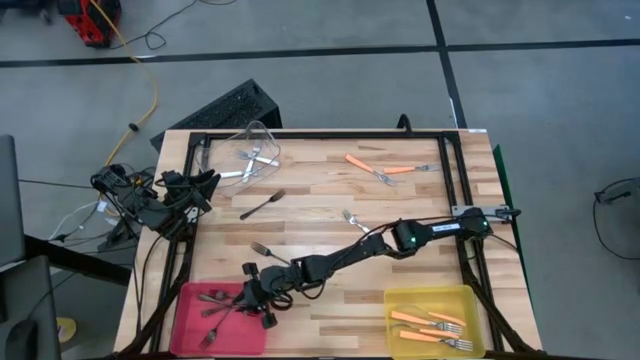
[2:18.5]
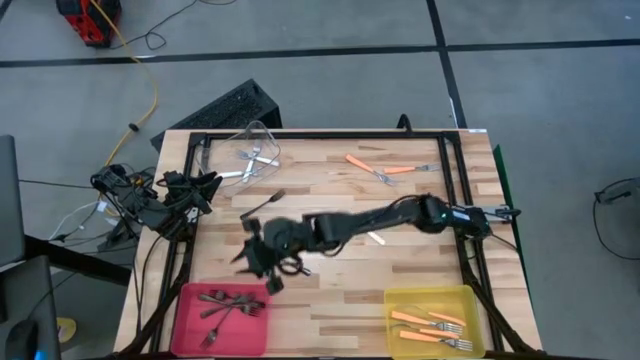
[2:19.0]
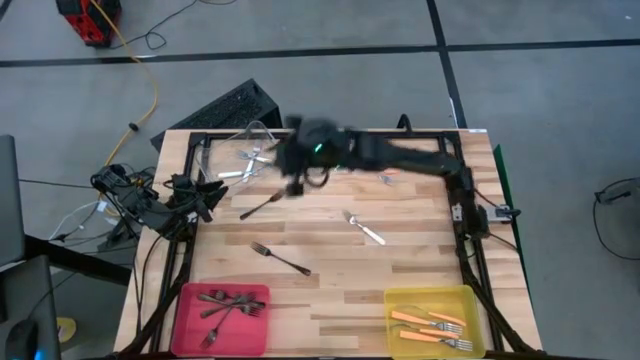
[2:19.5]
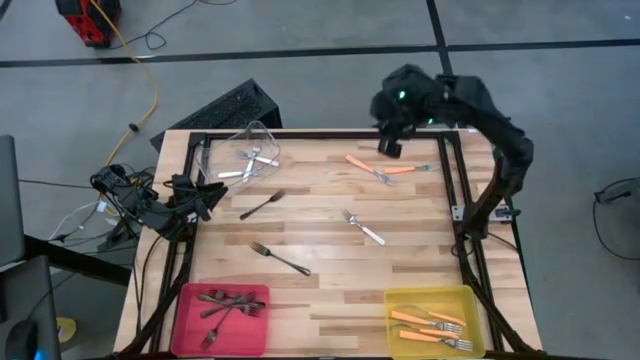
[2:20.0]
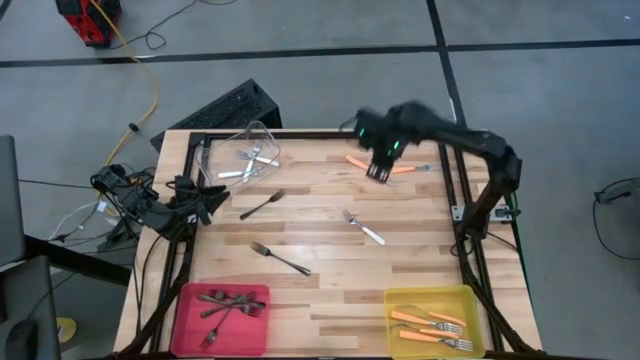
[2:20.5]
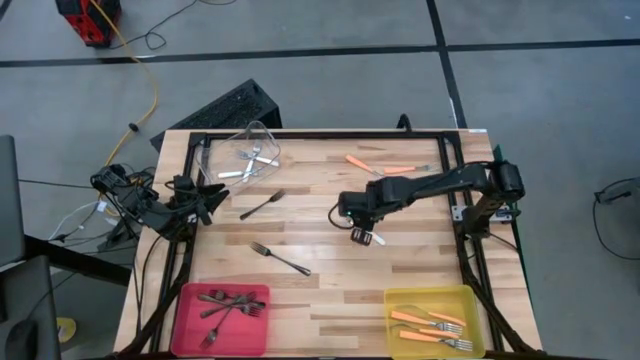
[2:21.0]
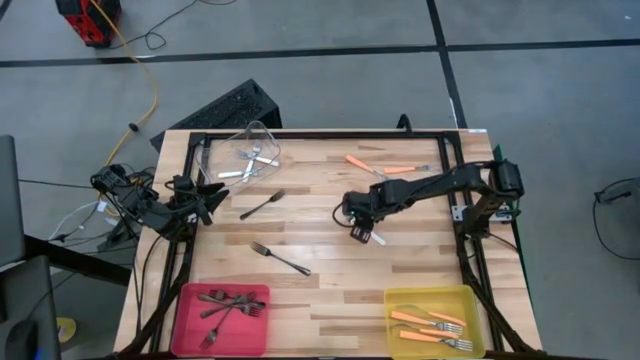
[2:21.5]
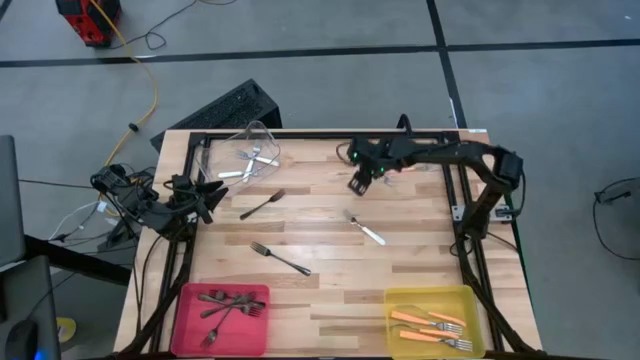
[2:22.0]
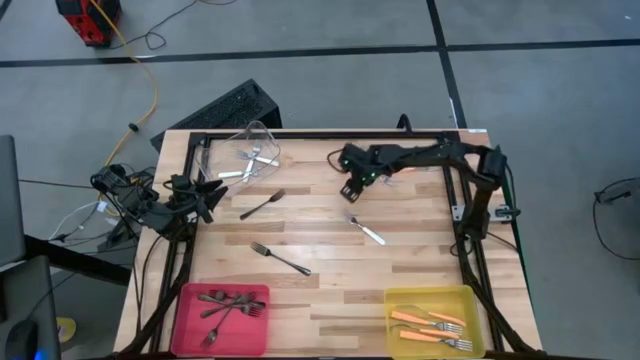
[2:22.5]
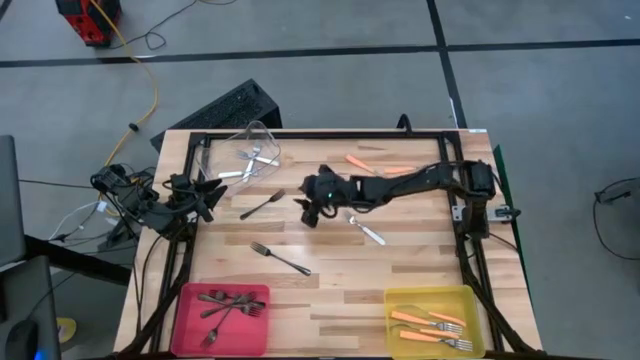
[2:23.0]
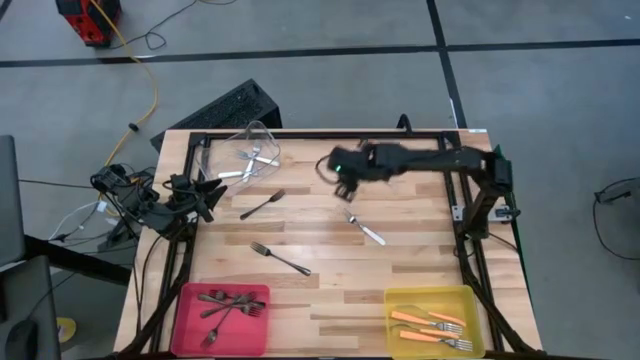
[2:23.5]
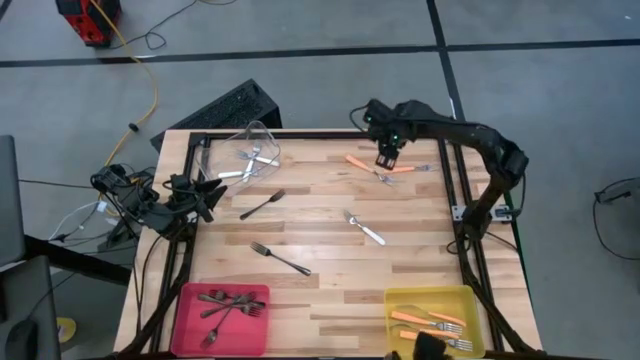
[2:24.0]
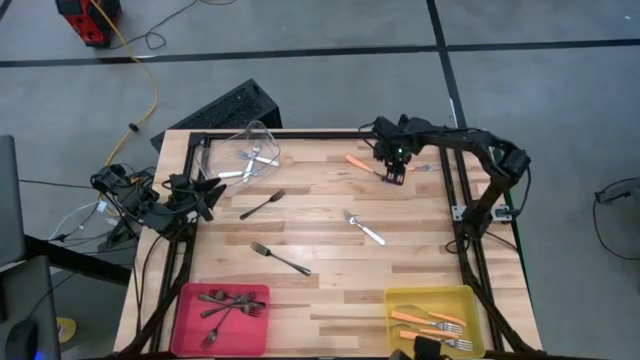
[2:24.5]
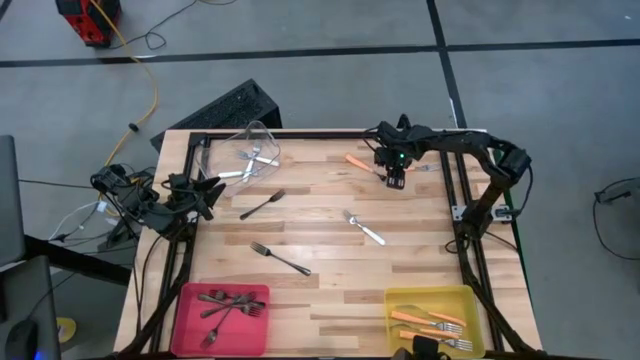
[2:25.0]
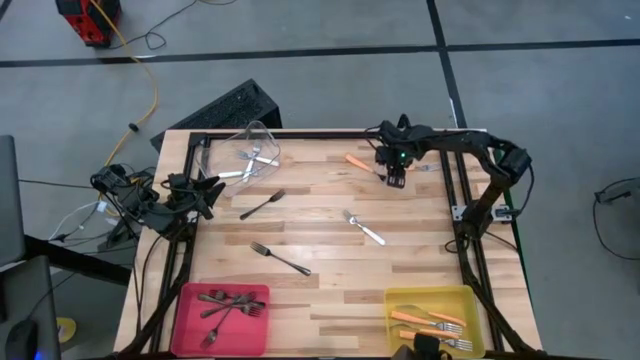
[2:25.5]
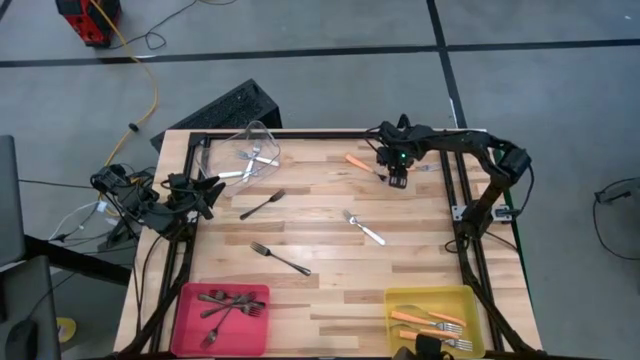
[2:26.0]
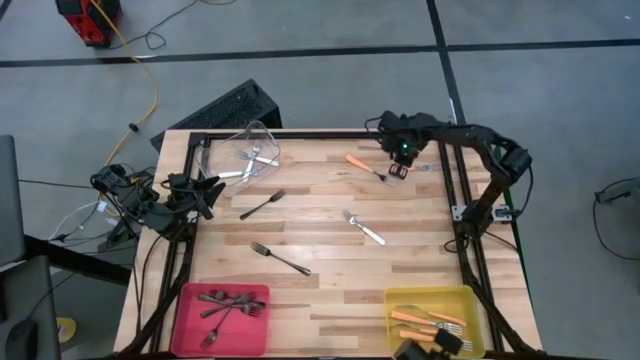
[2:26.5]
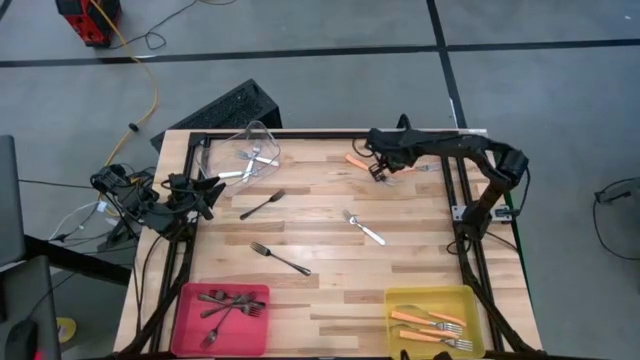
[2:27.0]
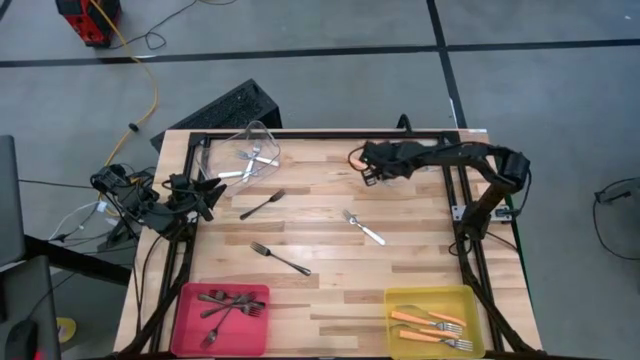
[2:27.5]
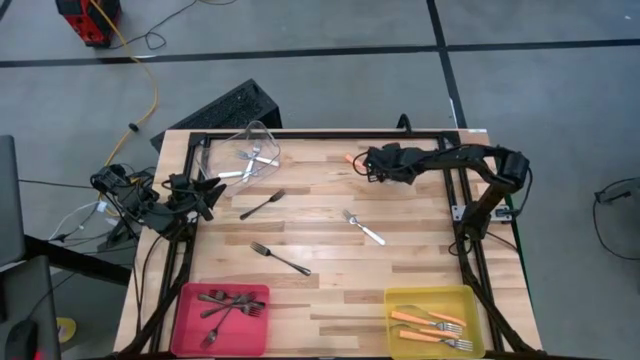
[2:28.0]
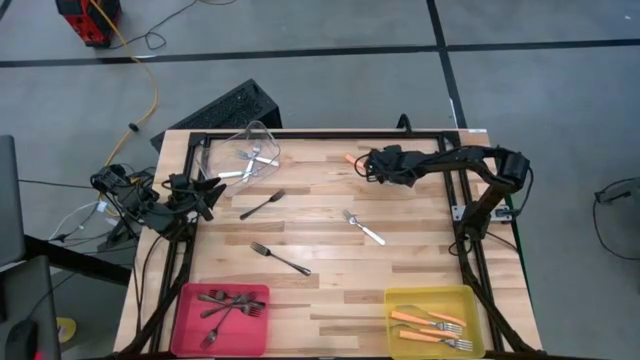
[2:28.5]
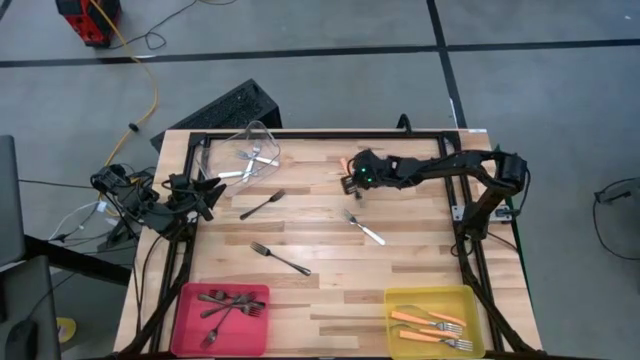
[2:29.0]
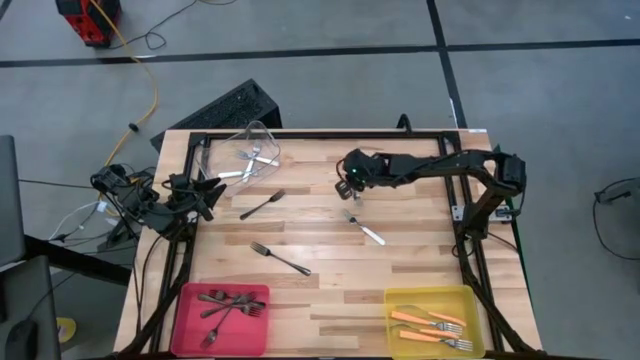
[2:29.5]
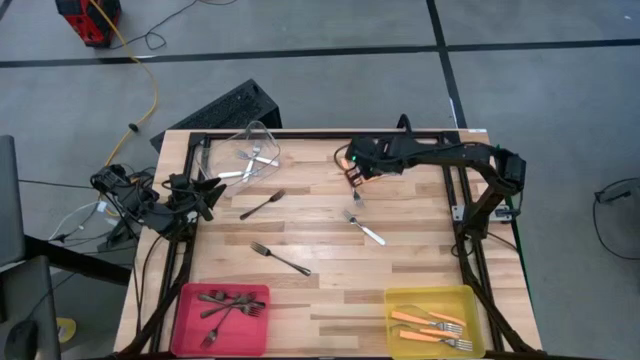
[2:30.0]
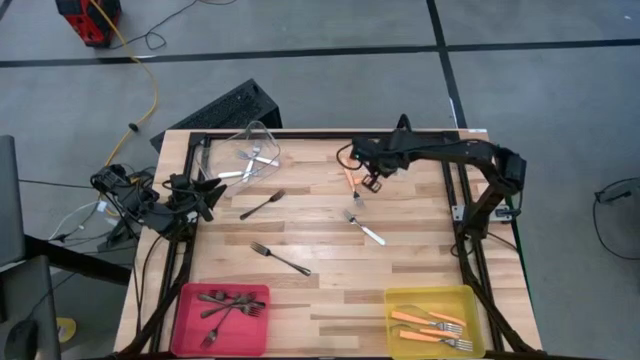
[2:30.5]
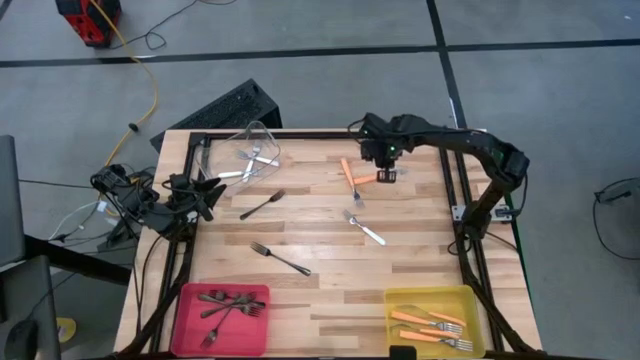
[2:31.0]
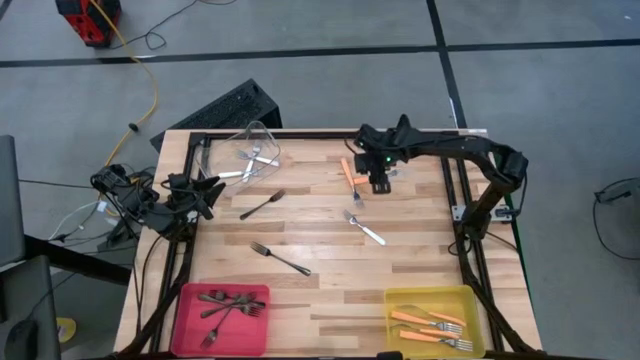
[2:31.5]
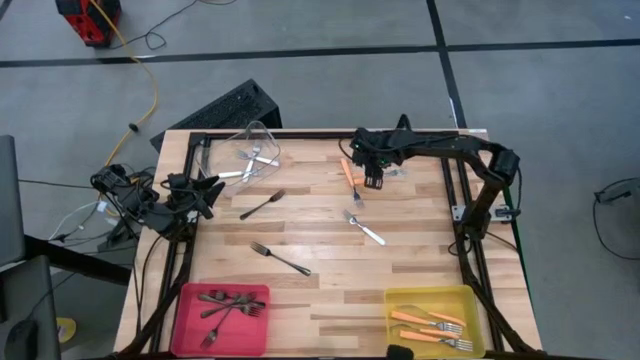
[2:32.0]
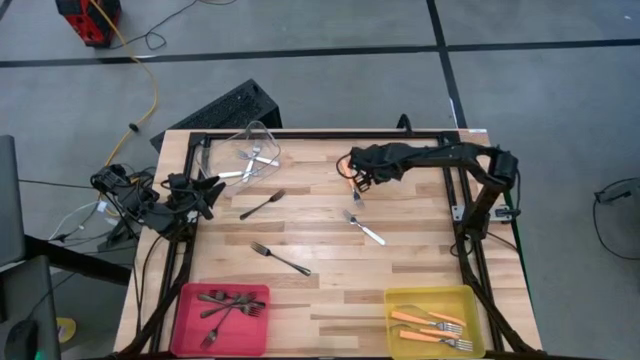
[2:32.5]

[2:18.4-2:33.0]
Task: Sort silverware by color (type)
Put the orange fork into the yellow bin

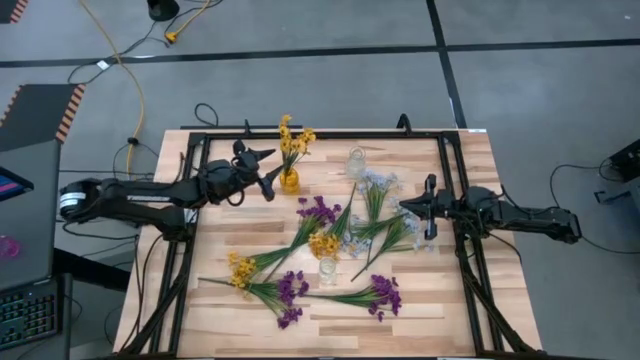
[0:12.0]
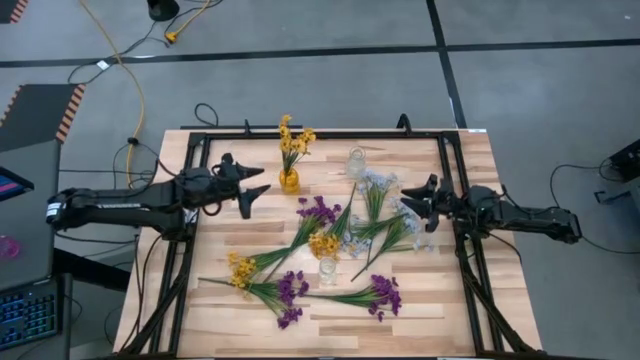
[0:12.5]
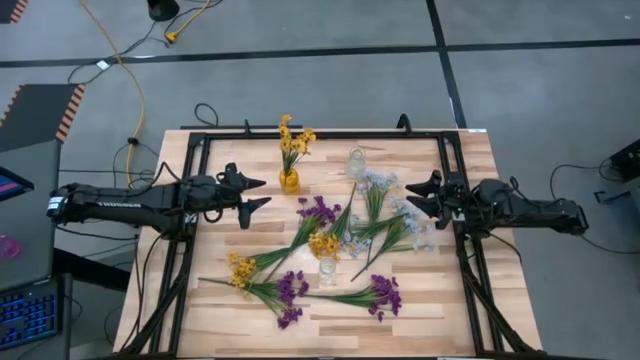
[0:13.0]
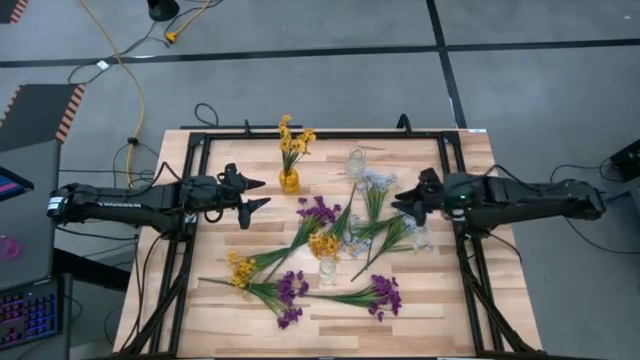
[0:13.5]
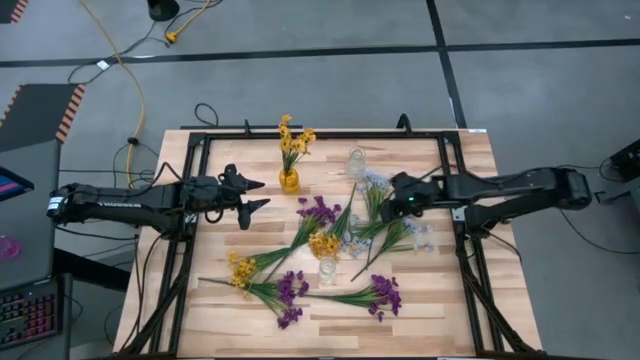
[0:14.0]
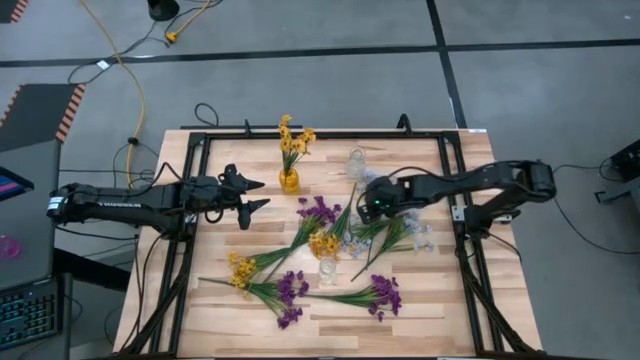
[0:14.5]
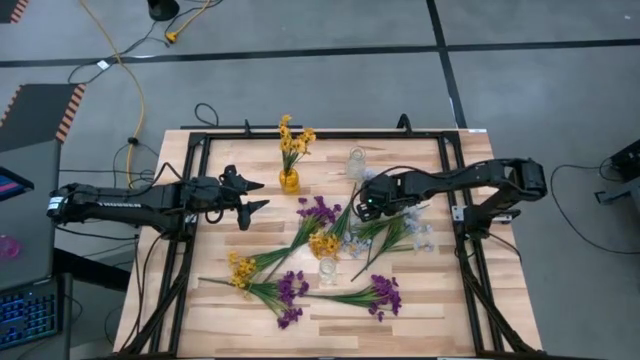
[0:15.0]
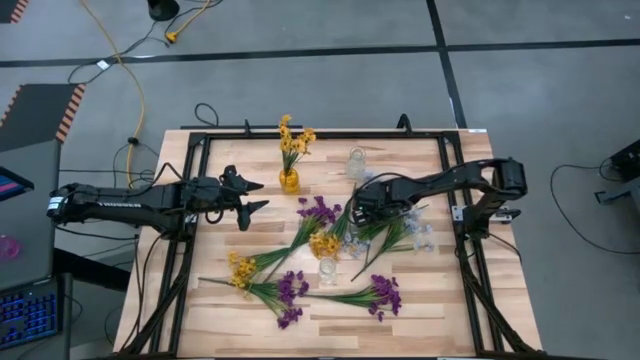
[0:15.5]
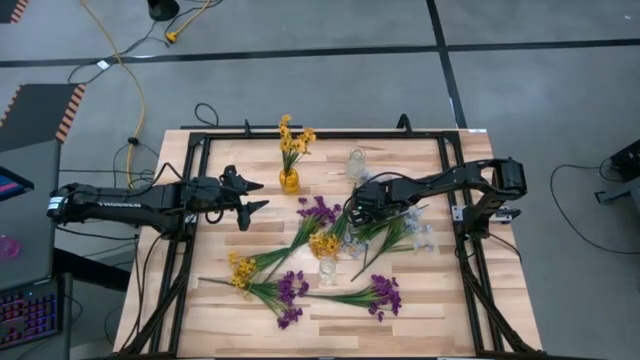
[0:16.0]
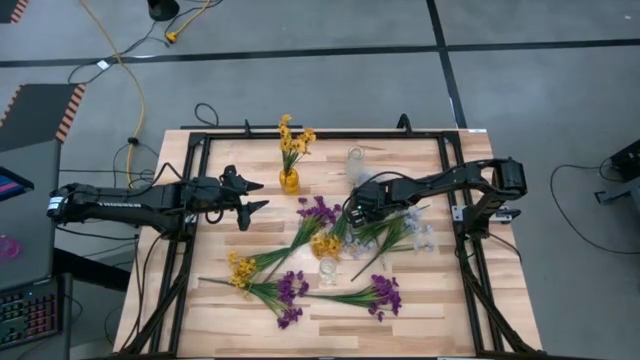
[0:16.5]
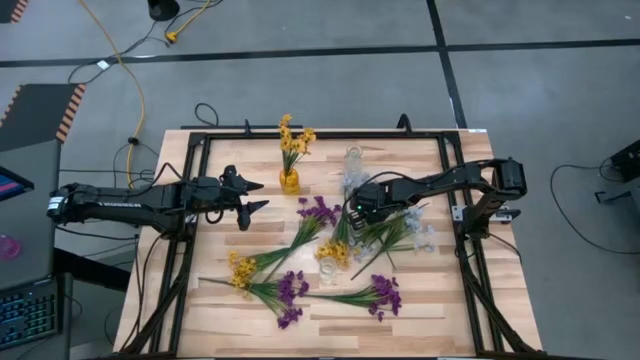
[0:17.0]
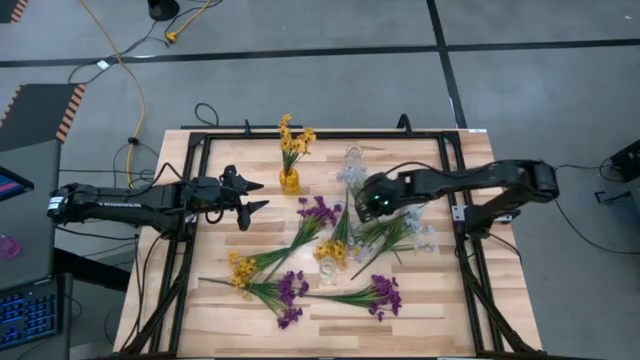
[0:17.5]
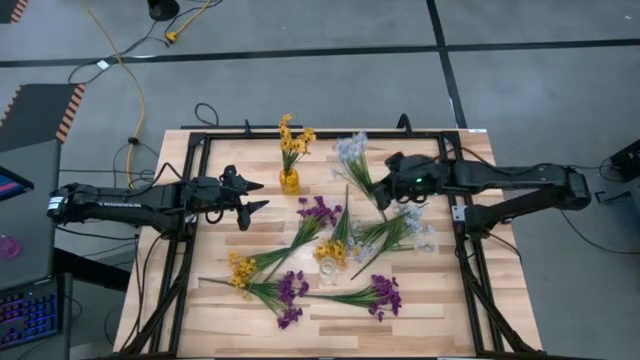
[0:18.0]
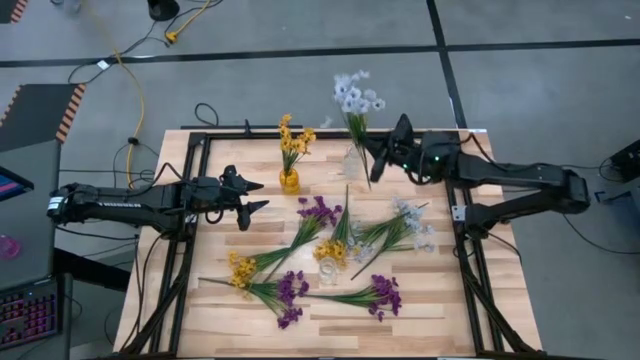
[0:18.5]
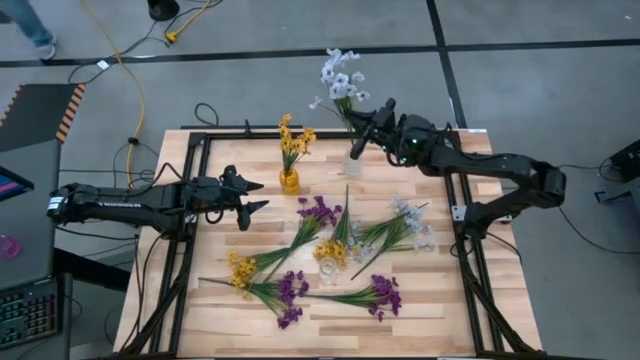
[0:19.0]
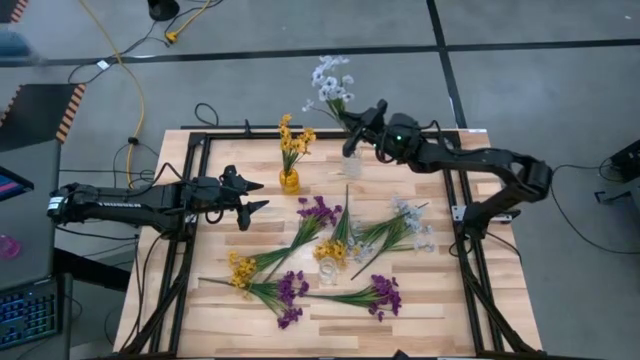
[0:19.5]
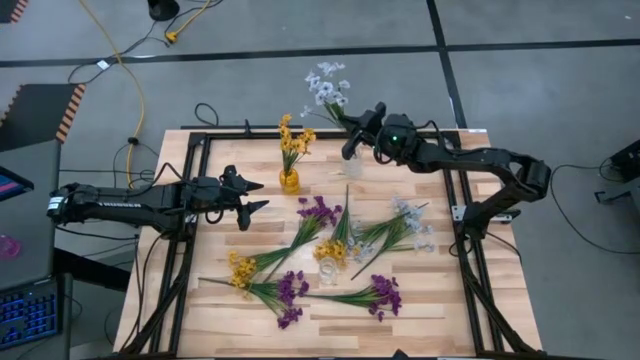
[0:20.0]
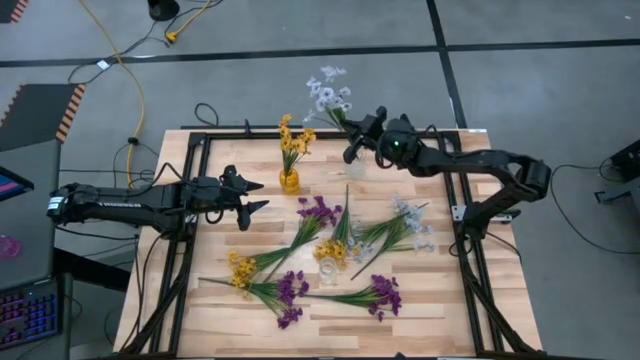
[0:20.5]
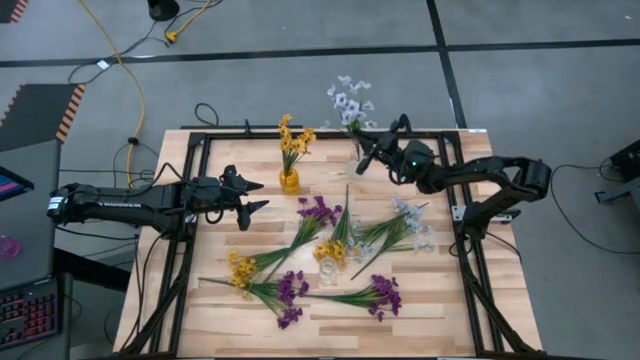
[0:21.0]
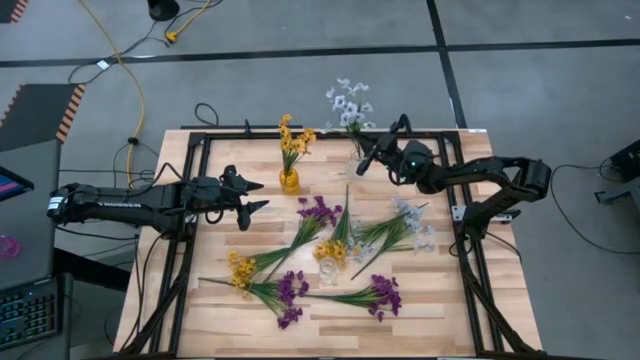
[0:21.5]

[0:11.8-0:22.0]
Task: Sort flowers into vase by color
Put the top white flowers into the top transparent vase
